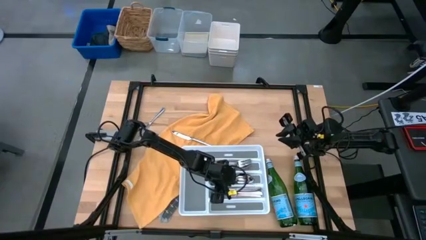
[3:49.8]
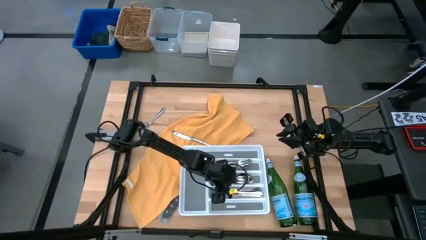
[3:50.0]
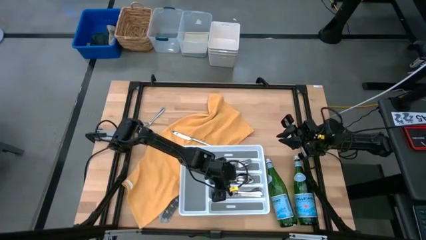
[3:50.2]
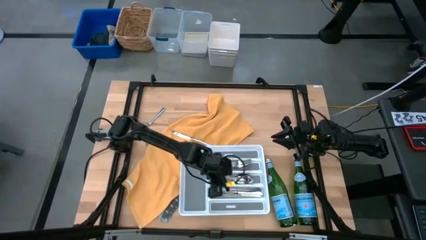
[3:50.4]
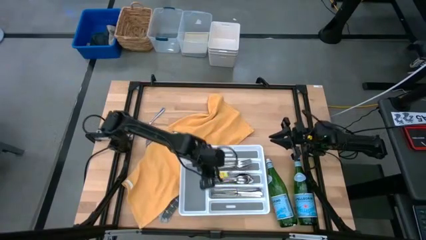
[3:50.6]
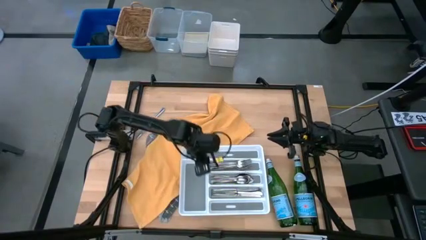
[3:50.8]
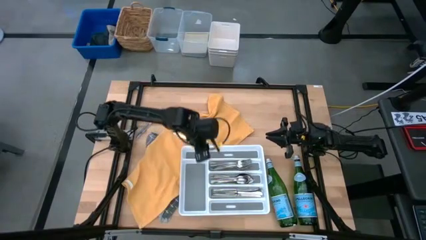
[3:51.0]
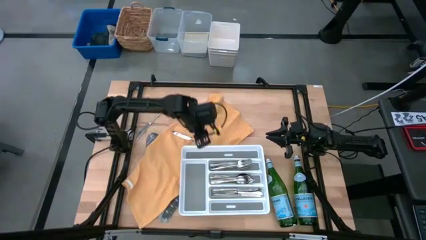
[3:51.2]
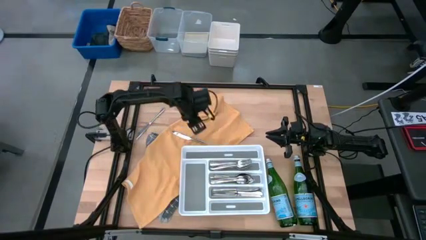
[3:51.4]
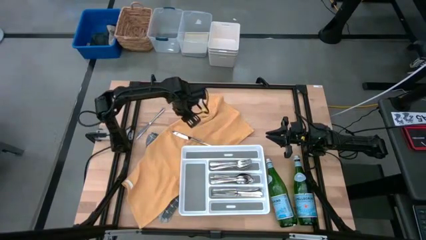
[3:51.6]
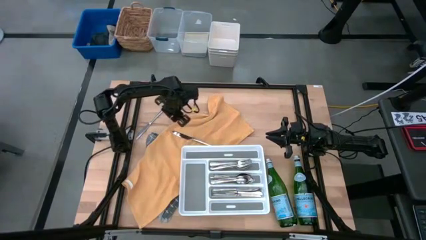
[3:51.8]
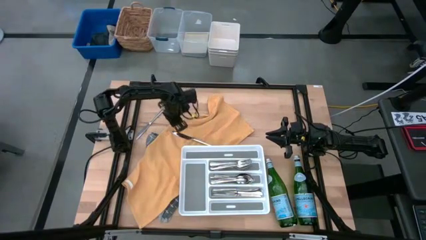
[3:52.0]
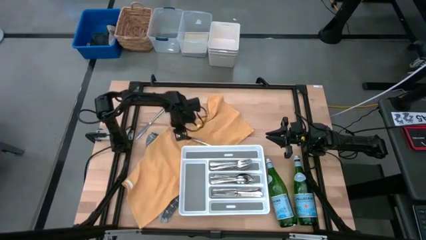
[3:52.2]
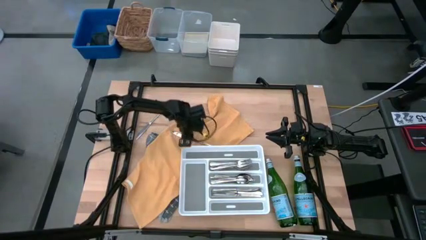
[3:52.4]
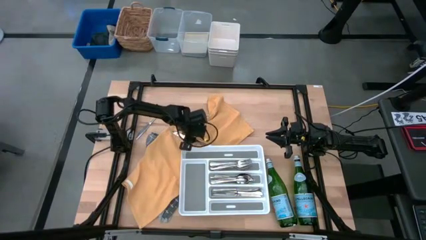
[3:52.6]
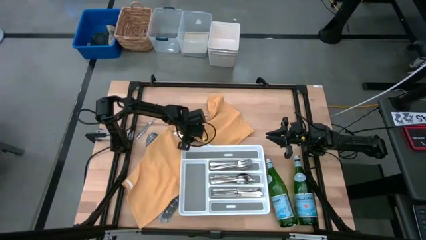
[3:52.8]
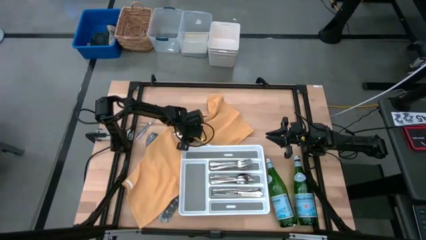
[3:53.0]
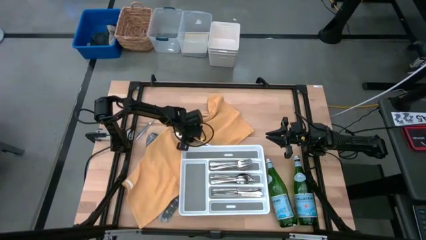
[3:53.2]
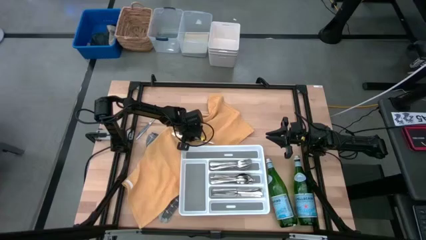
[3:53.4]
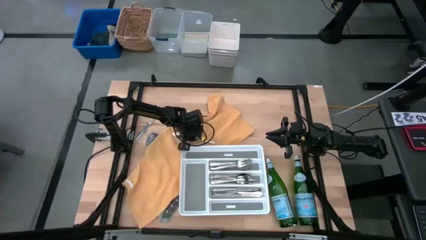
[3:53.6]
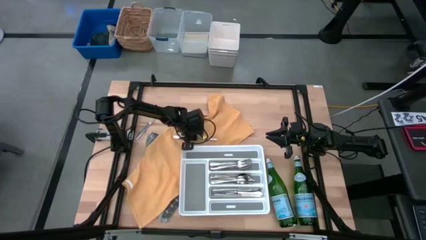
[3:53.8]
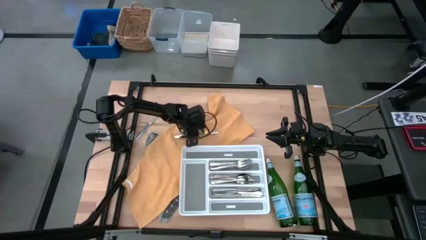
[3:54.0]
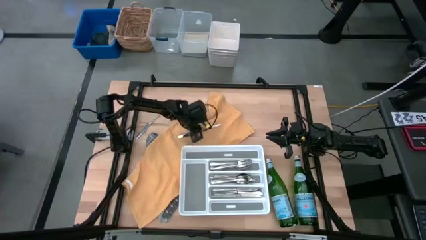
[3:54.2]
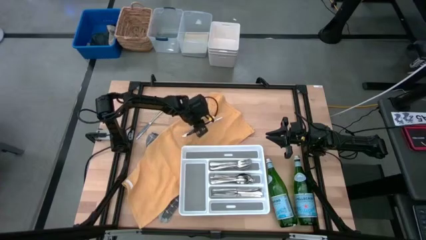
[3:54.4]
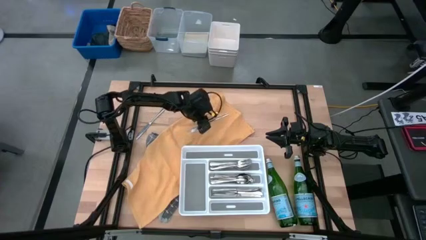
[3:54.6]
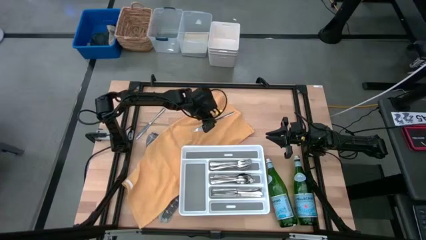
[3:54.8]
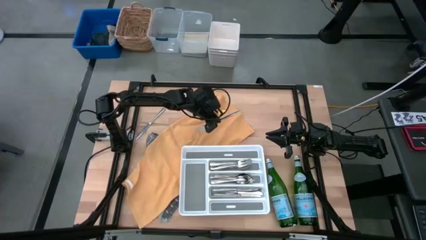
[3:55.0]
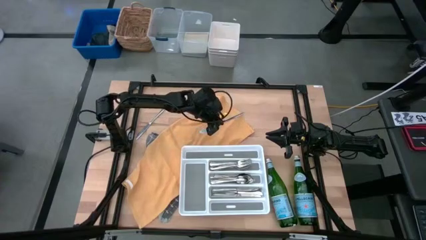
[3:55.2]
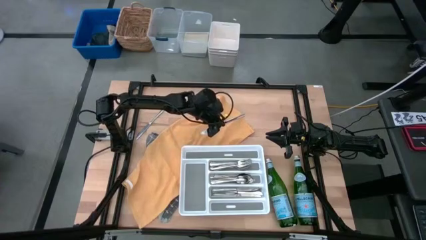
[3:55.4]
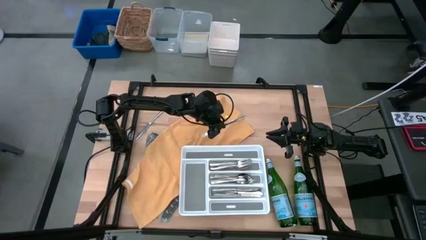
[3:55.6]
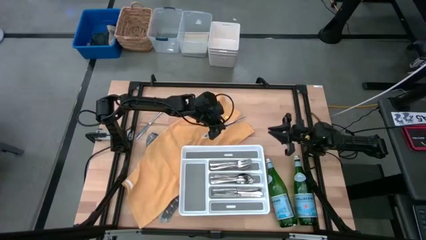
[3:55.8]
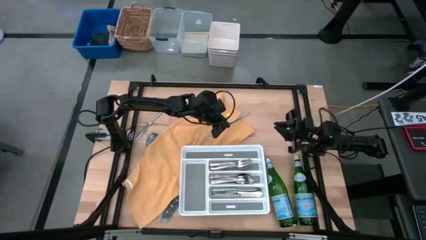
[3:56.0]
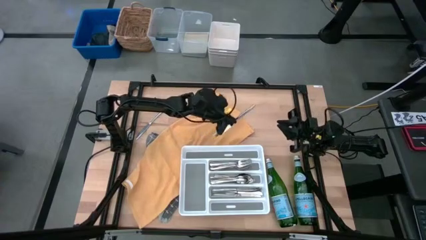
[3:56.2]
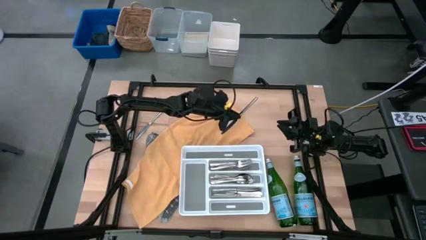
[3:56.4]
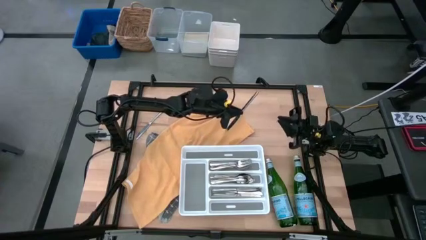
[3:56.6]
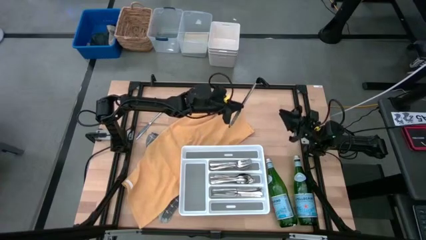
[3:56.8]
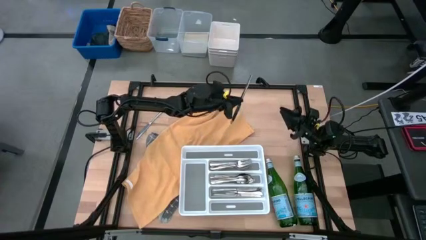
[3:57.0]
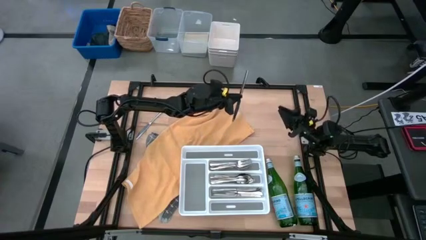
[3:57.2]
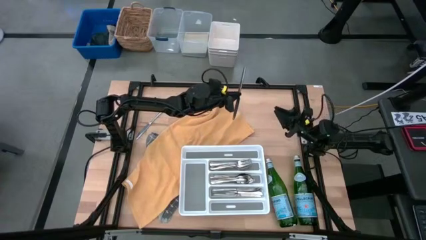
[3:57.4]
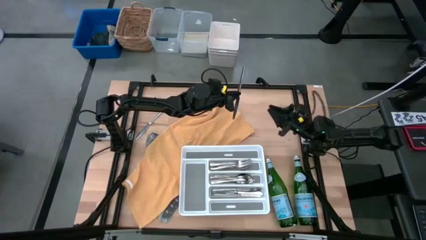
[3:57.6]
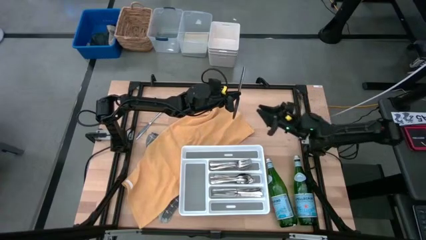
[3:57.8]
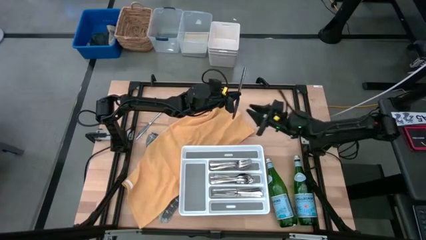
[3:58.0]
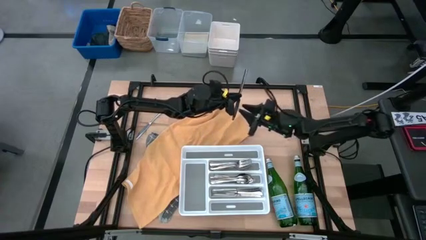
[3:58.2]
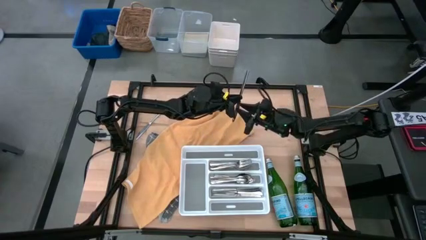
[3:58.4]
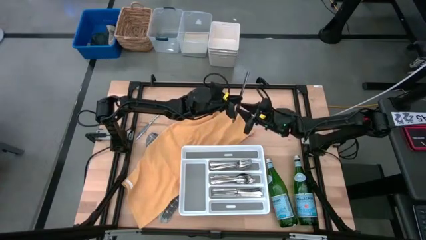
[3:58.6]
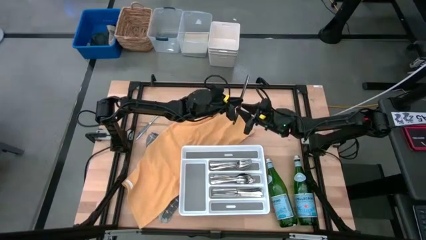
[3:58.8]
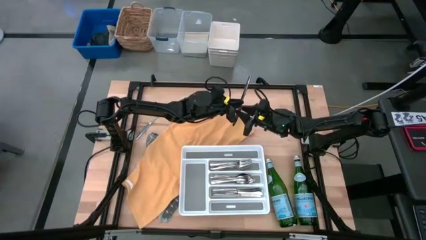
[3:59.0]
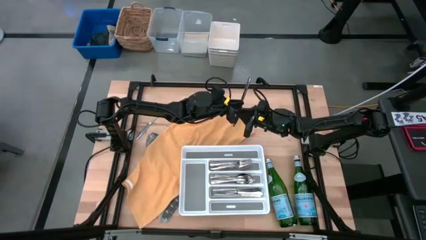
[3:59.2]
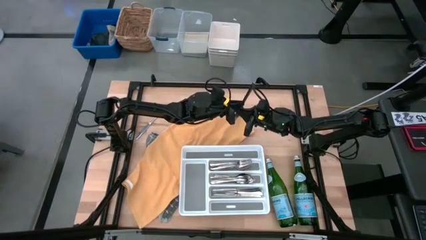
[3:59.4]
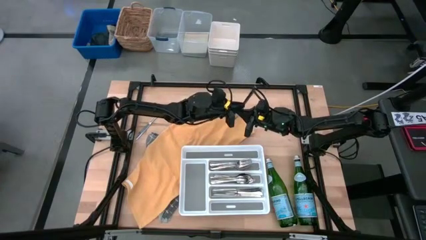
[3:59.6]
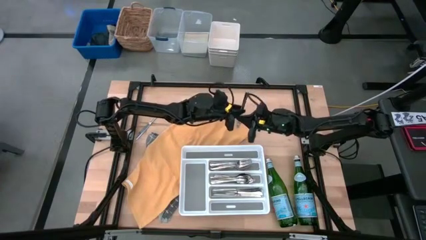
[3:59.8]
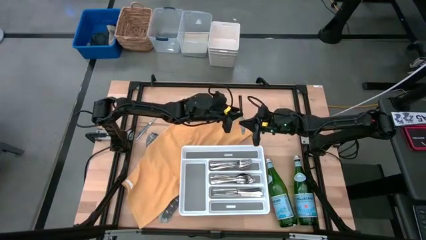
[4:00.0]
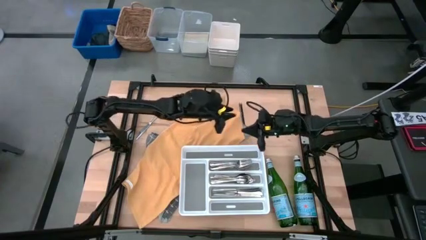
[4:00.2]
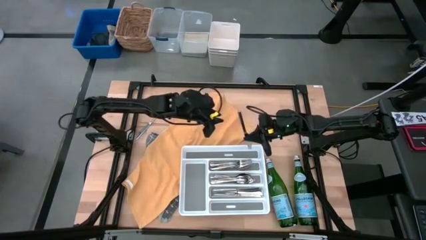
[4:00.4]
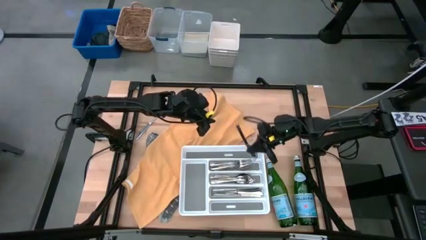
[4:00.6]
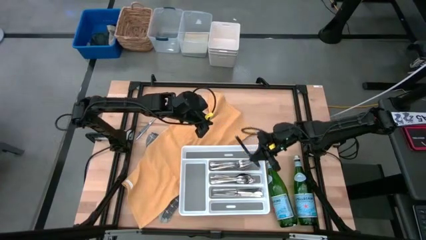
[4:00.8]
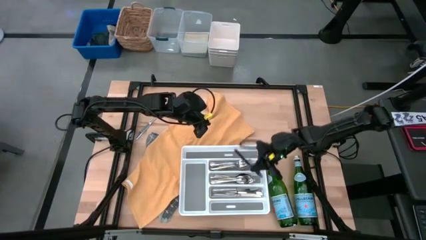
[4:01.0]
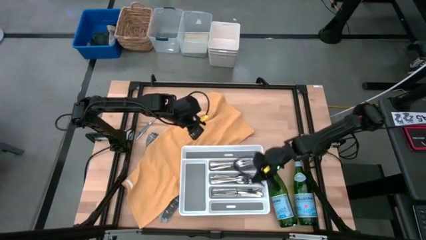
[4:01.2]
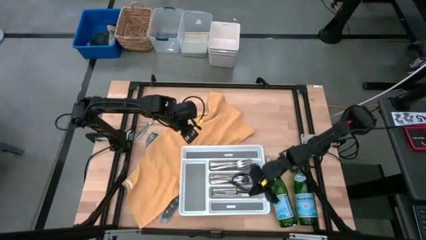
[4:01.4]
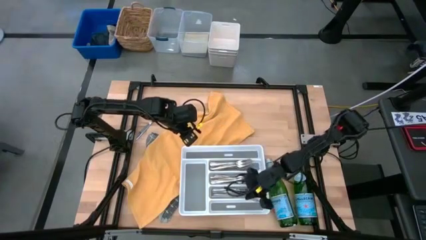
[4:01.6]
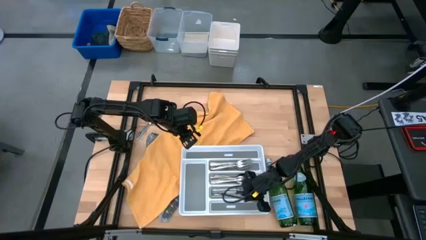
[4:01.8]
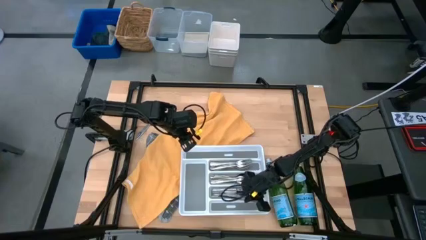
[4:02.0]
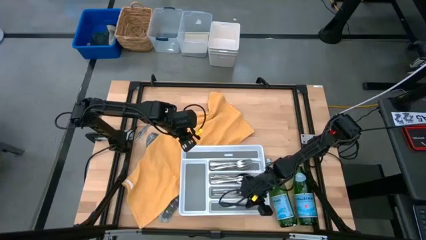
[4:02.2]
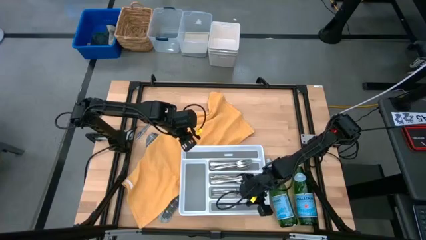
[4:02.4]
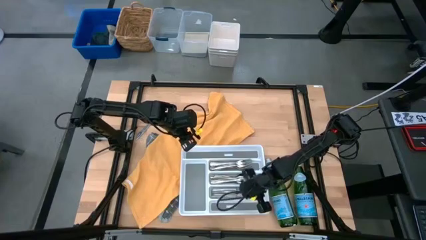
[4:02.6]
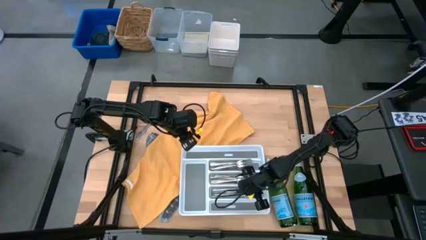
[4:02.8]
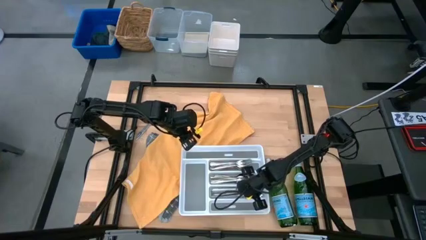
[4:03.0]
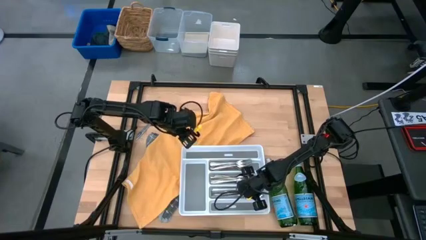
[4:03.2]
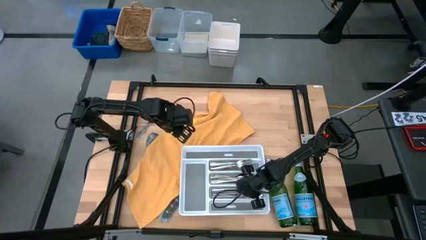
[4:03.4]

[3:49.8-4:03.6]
Task: Sort silverware
Put the silver table knife into the white silverware tray

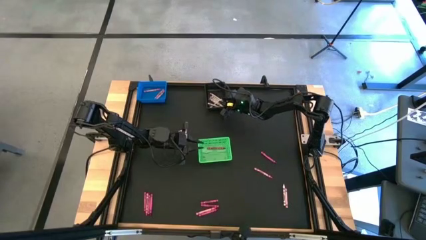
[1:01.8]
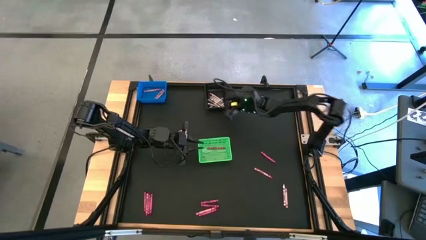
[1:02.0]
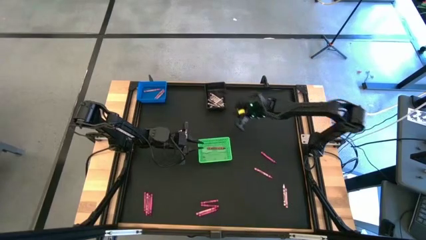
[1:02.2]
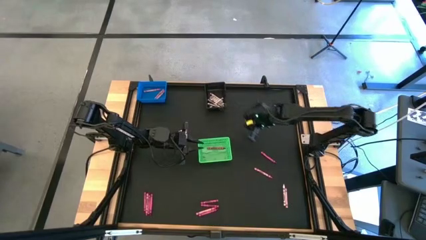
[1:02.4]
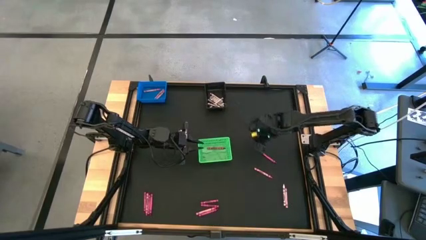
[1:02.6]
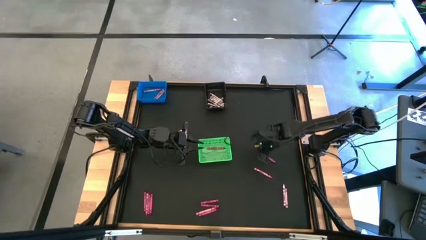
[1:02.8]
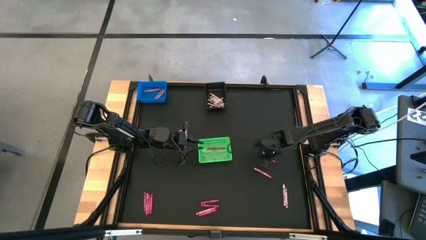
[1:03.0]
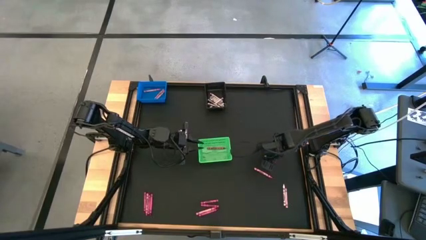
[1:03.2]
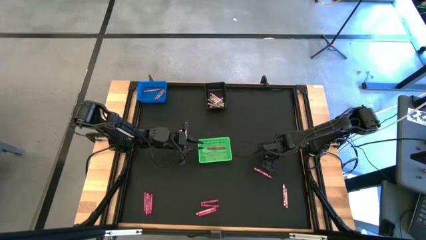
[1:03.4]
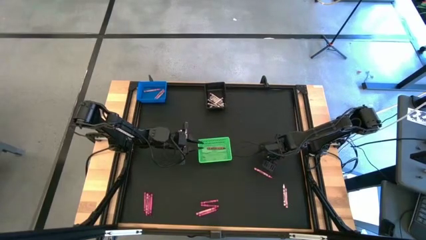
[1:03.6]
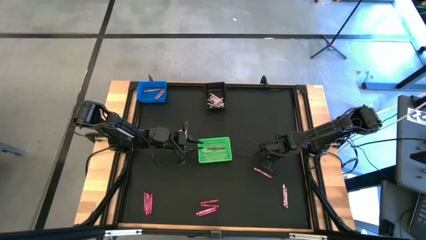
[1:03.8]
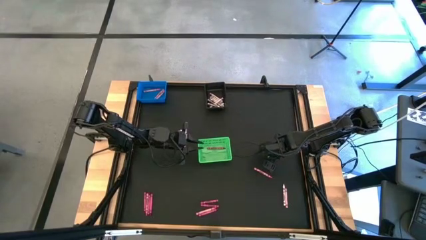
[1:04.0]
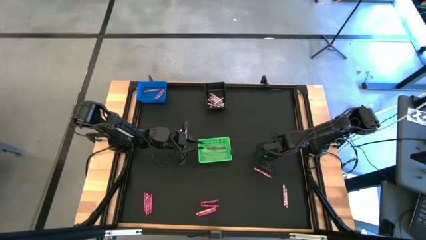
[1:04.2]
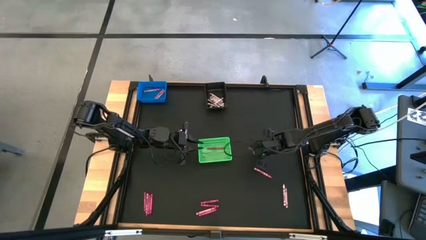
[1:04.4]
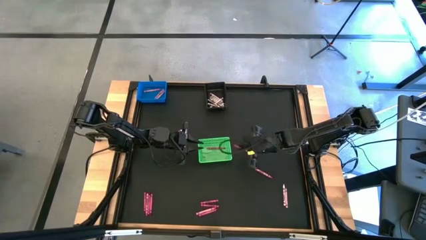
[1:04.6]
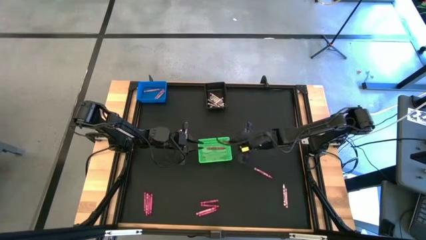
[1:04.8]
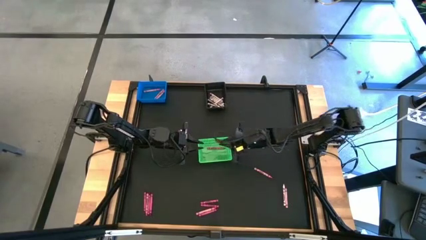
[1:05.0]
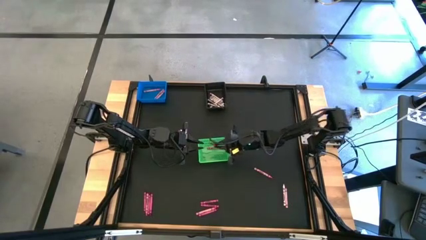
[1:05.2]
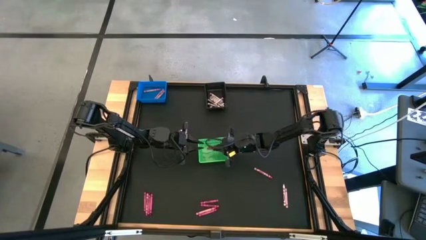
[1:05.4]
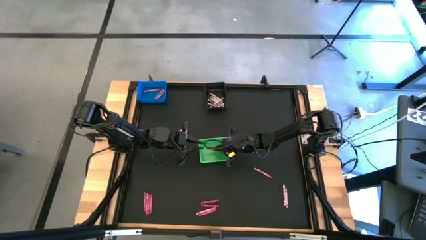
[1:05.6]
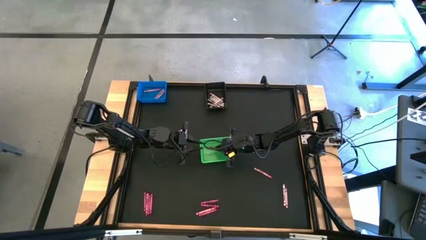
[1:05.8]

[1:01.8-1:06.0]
Task: Sort crayons
Put the red crayon into the green bin
